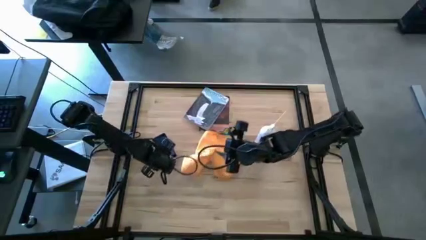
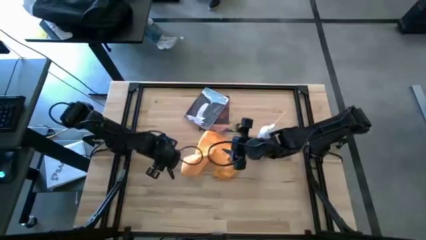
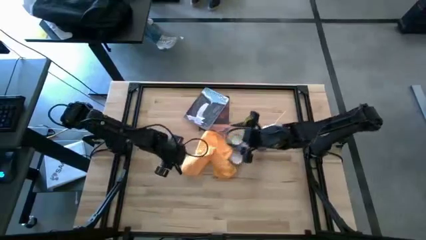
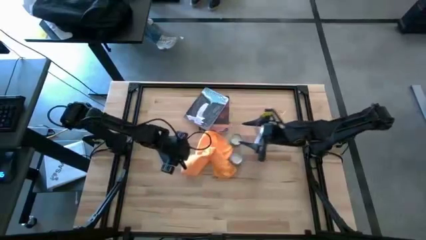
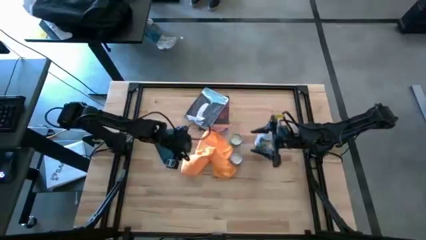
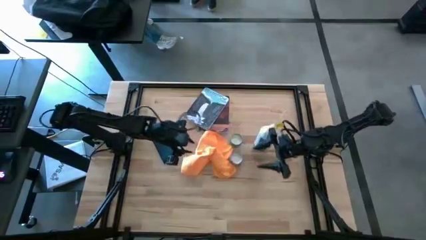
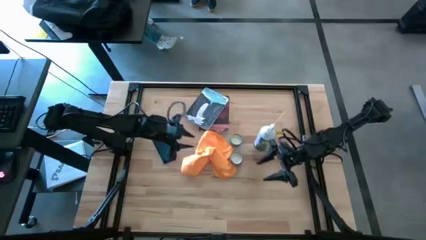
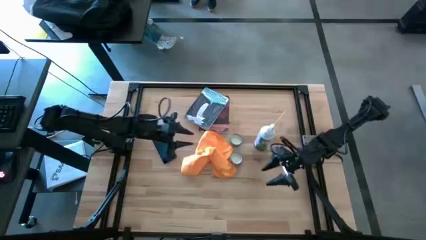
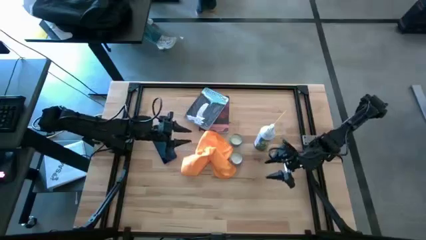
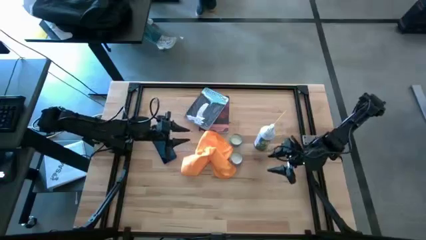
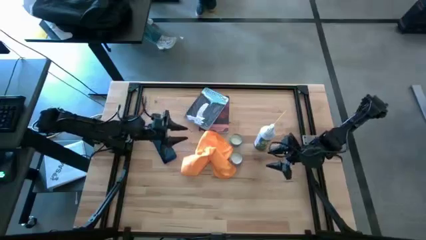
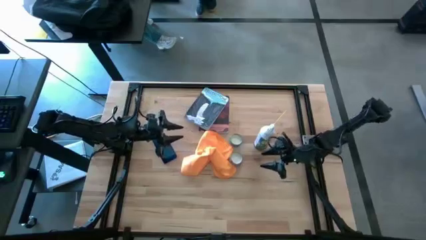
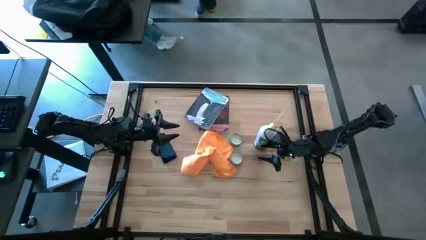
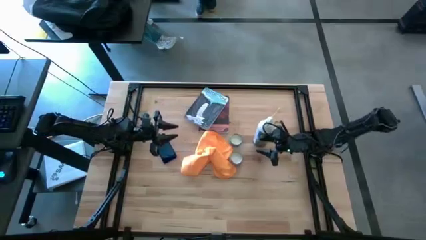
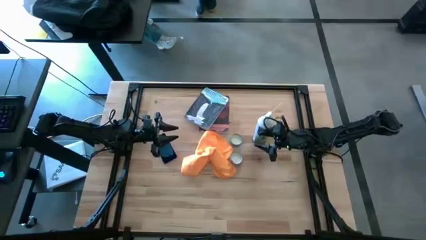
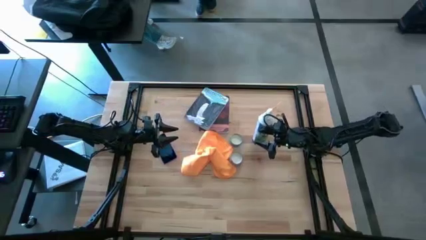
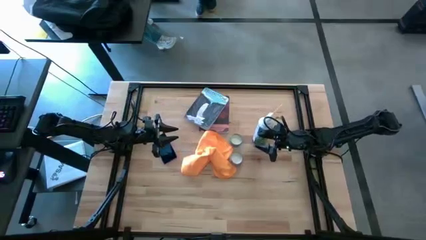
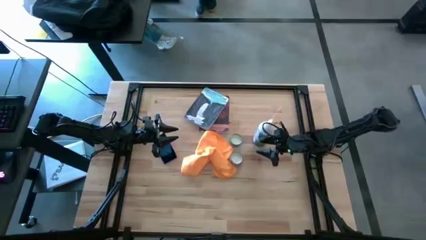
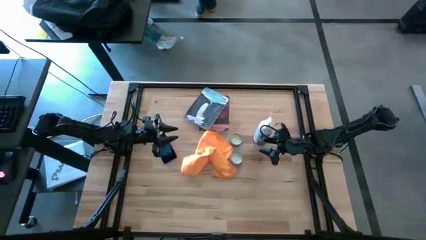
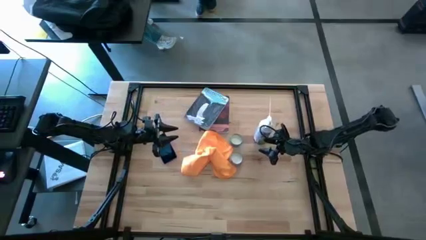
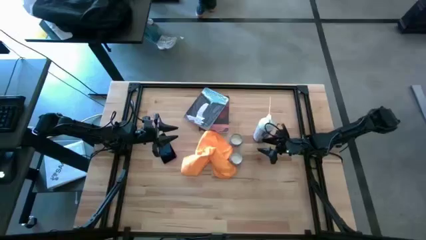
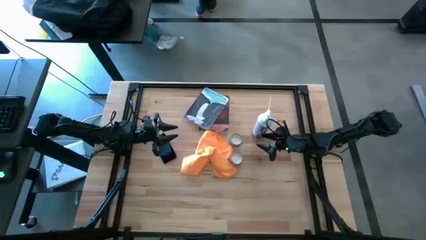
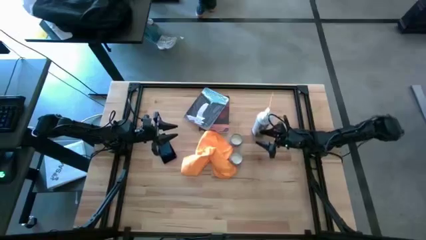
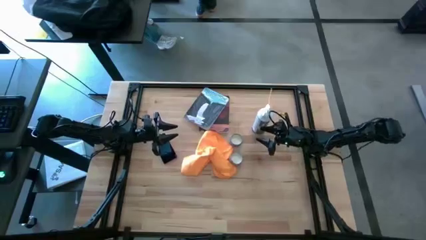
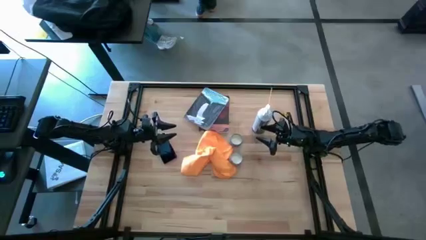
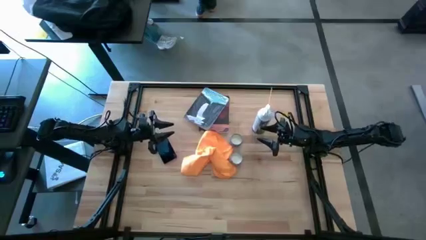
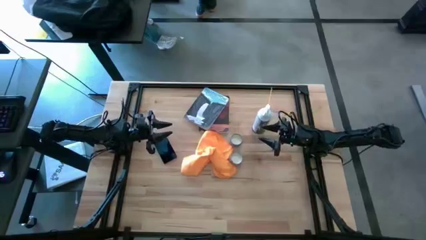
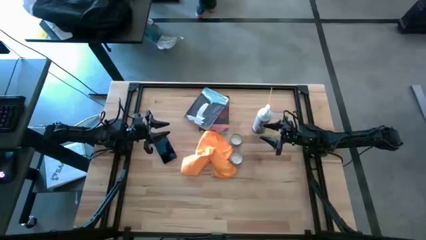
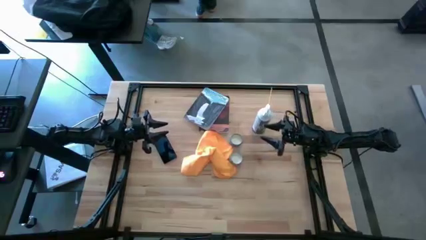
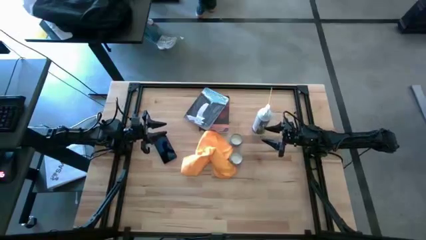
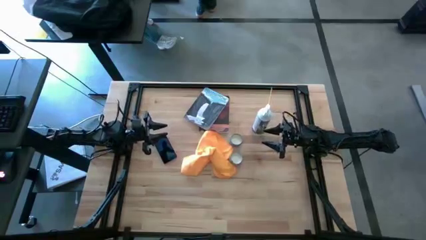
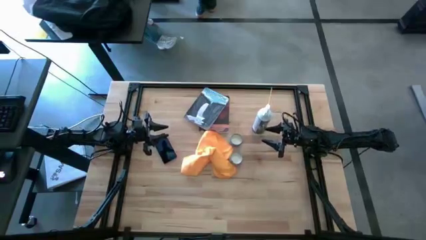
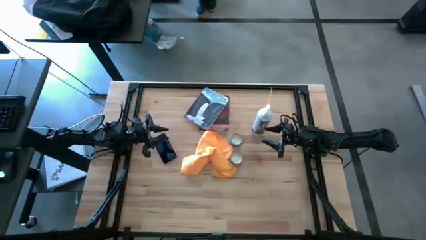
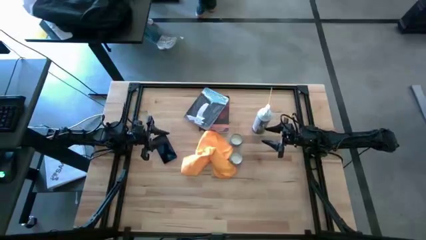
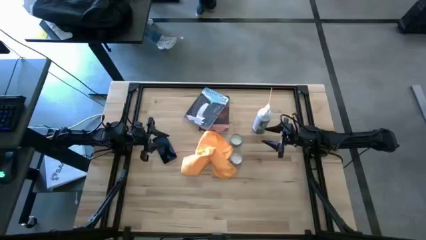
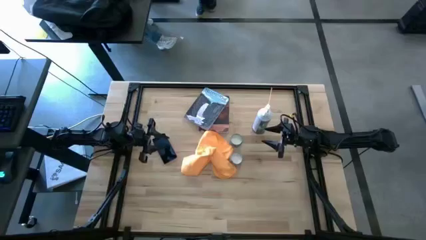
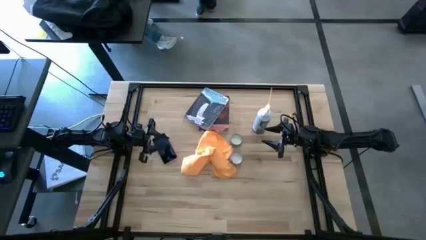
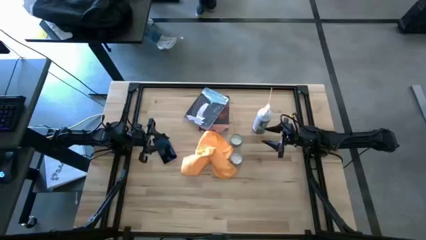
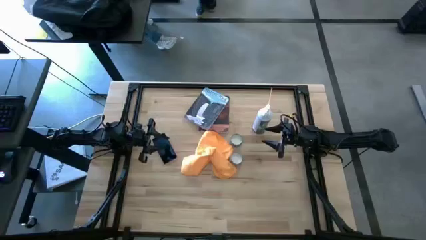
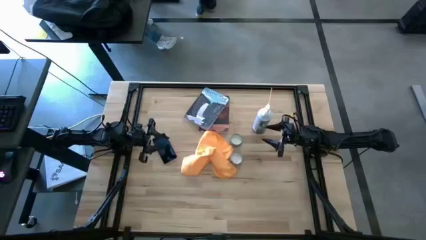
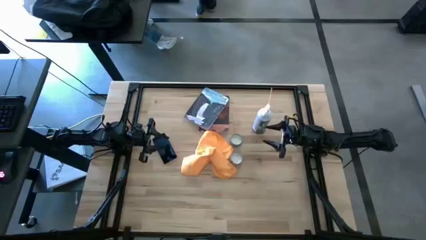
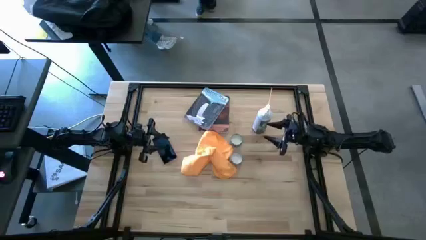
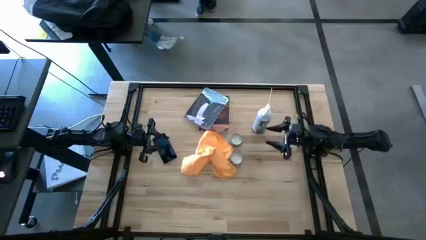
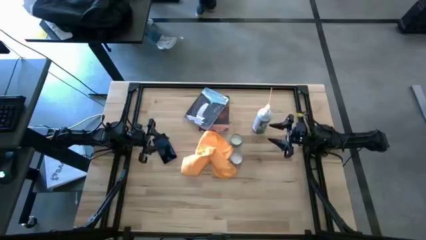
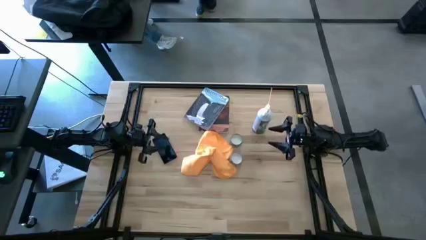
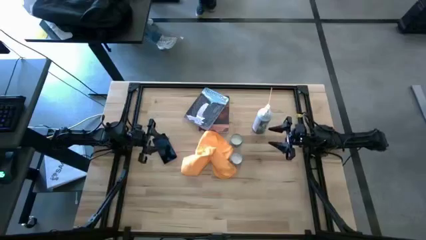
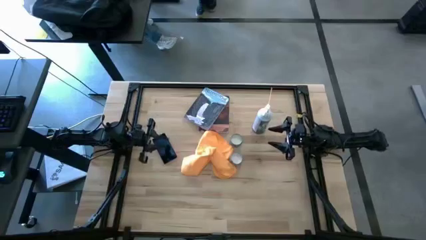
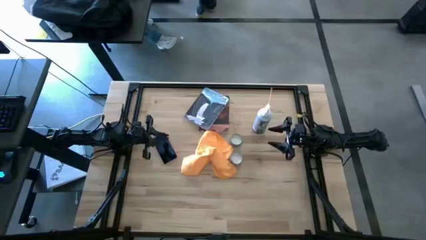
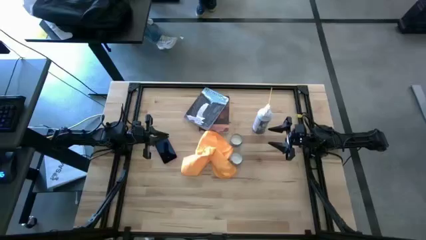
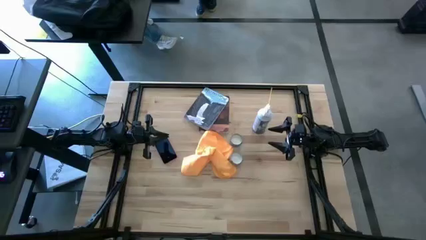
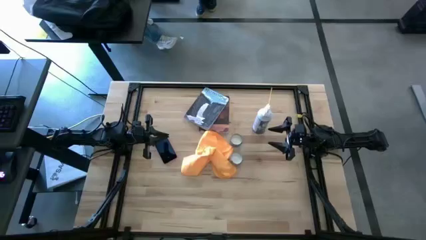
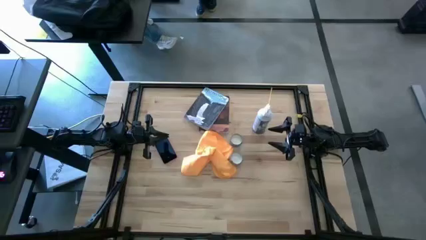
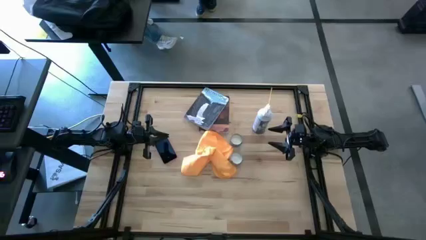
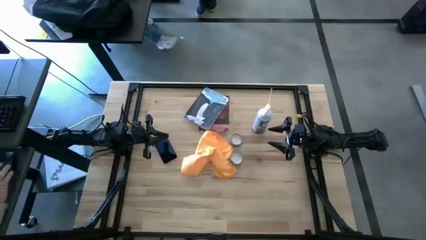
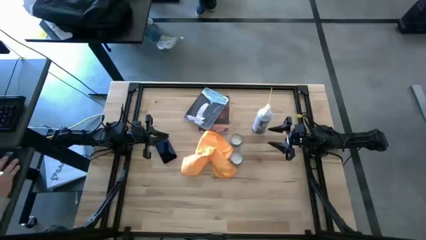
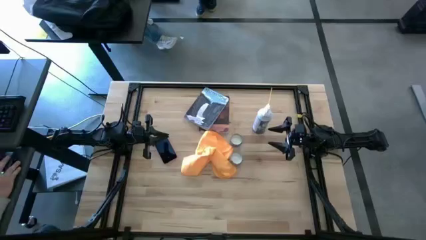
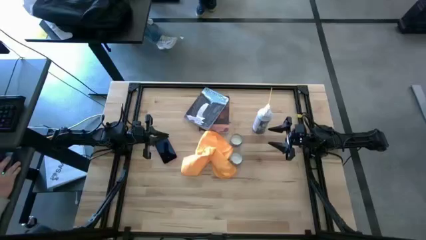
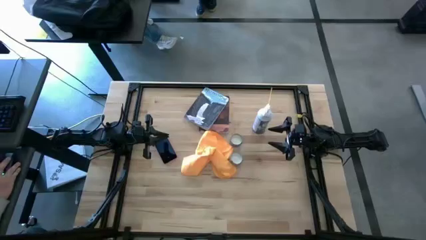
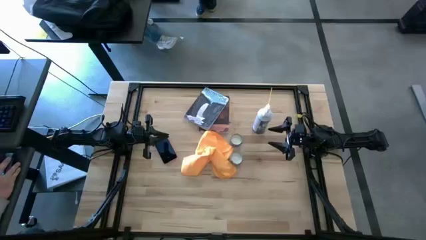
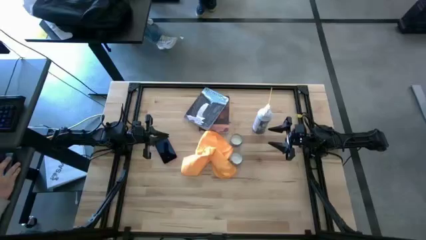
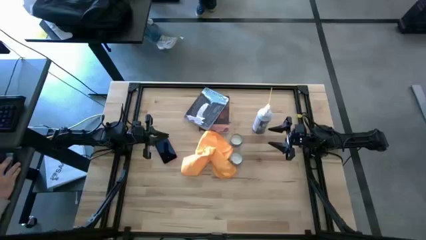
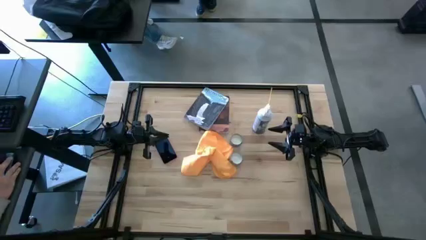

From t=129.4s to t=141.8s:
Task: Apply microfiber cloth
Return to Home Position

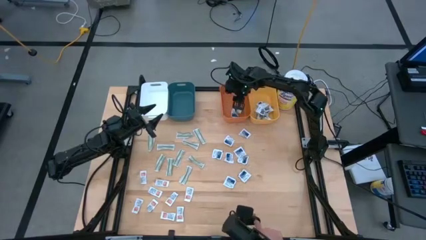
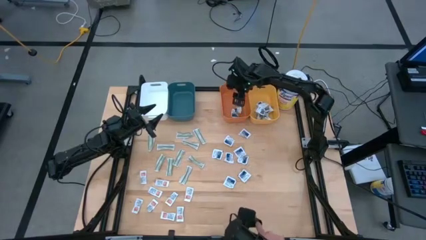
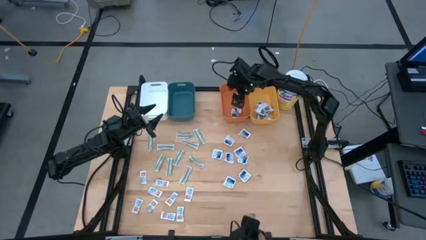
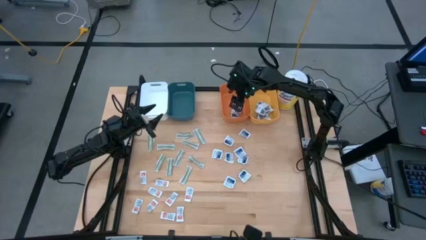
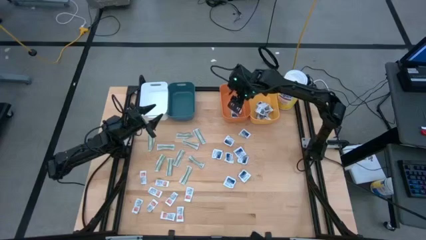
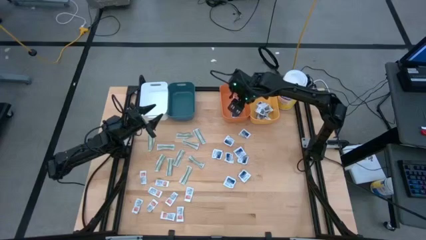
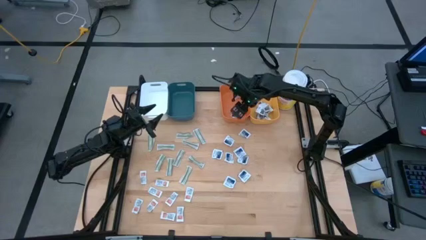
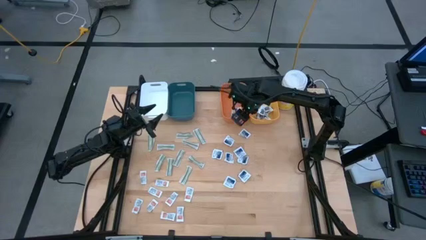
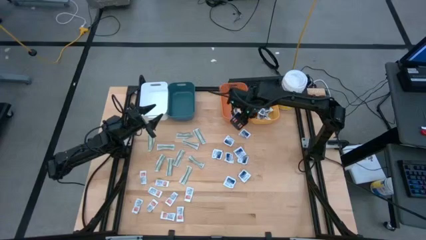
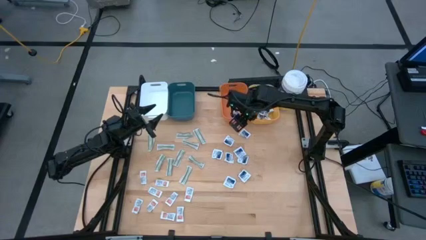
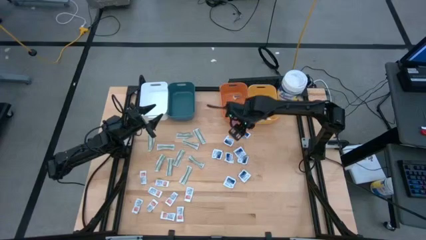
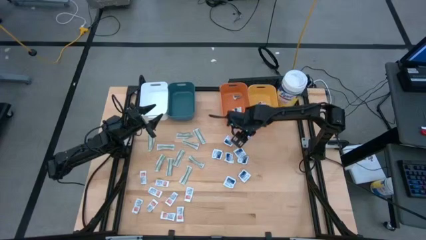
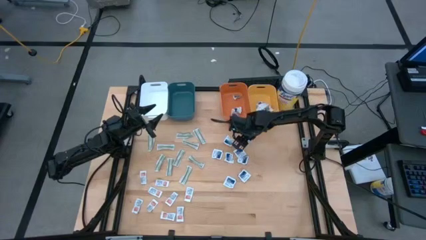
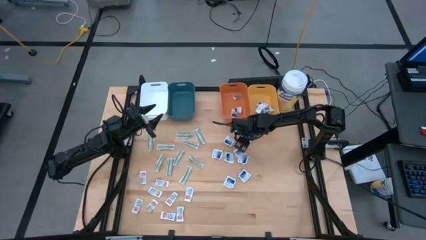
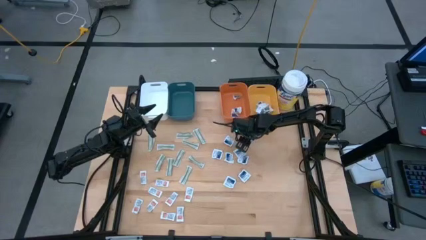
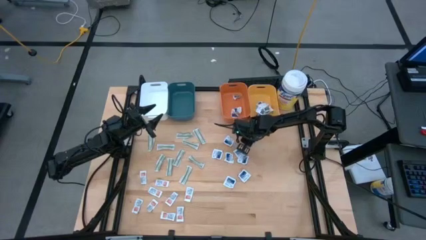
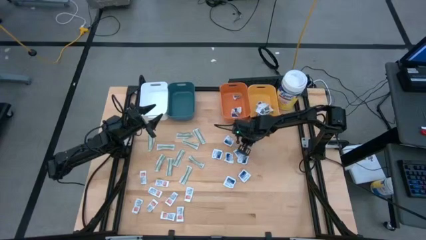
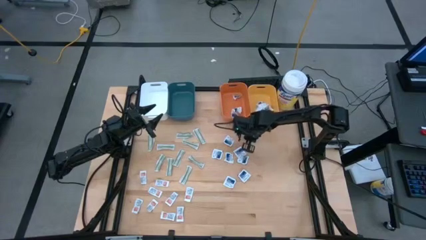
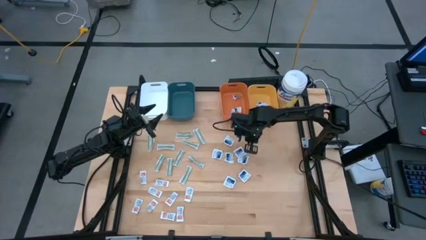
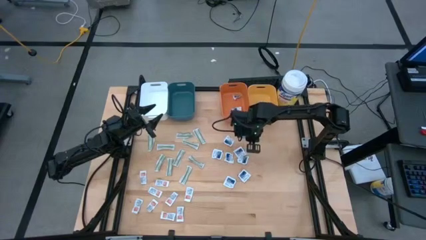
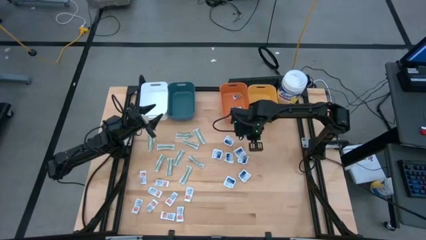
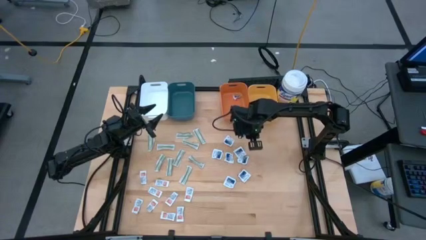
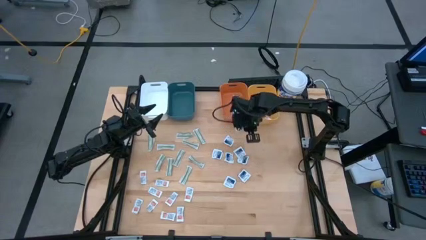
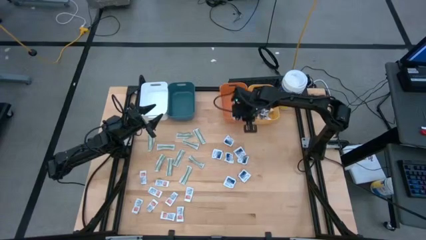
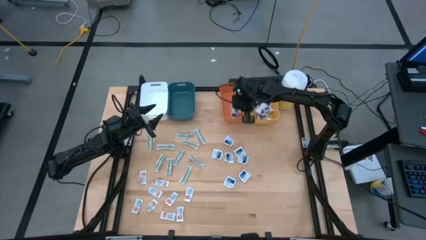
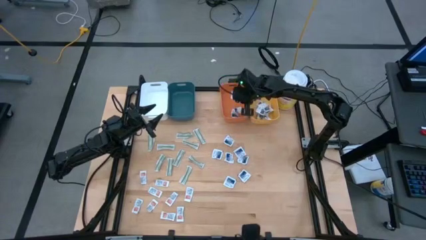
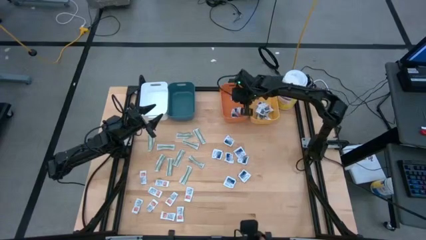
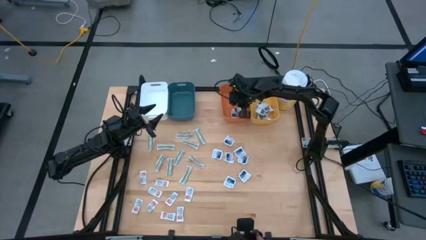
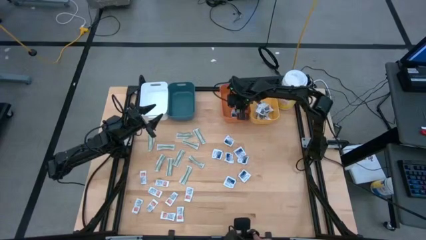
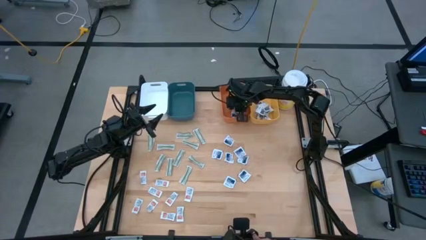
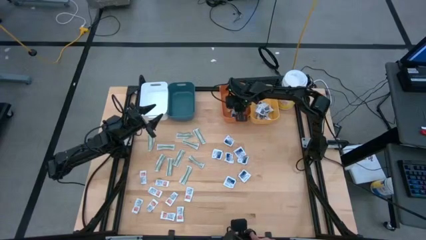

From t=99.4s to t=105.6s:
Task: Pick & Place First Aid Supplies
Put the alcohol pad into the orange bin
